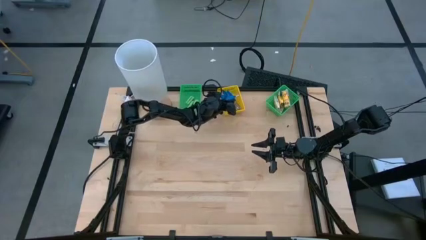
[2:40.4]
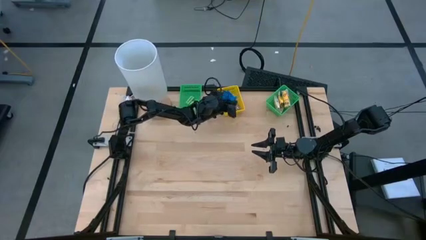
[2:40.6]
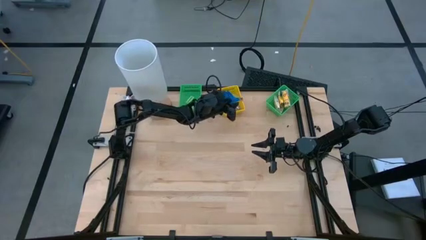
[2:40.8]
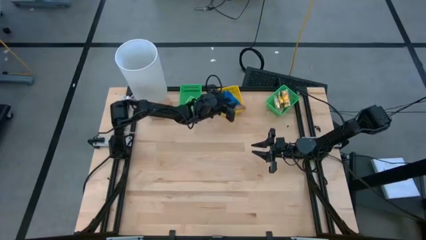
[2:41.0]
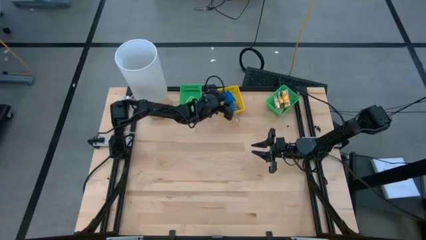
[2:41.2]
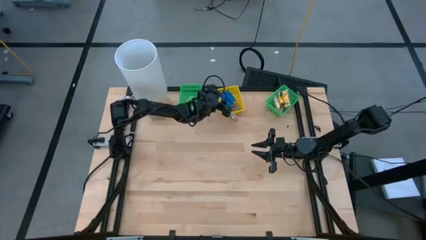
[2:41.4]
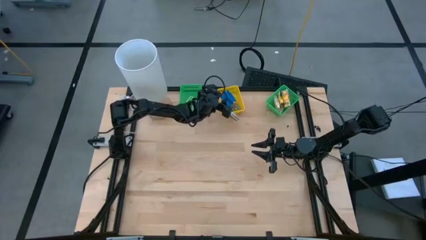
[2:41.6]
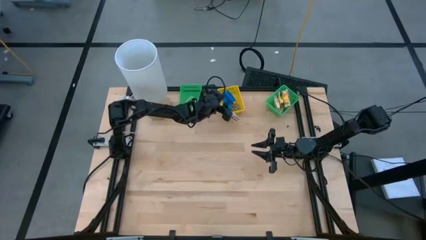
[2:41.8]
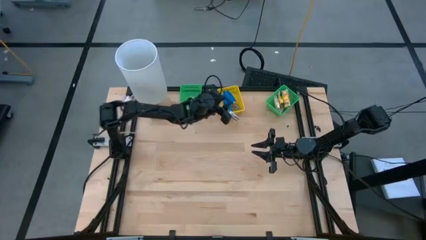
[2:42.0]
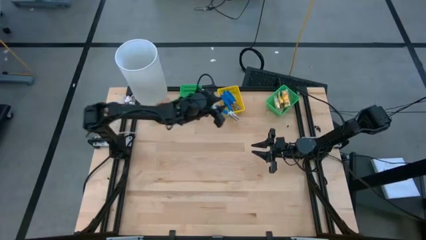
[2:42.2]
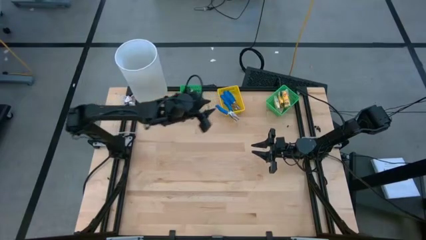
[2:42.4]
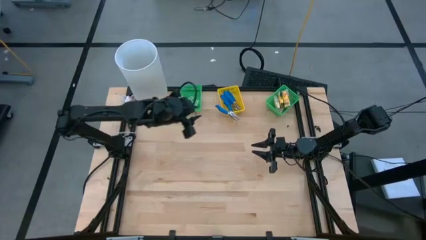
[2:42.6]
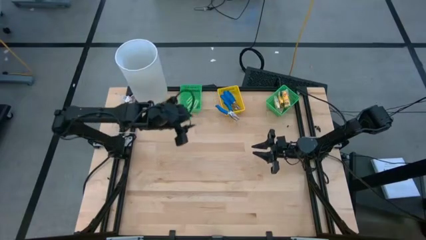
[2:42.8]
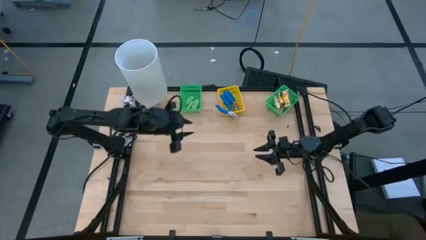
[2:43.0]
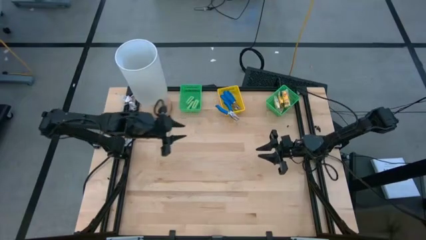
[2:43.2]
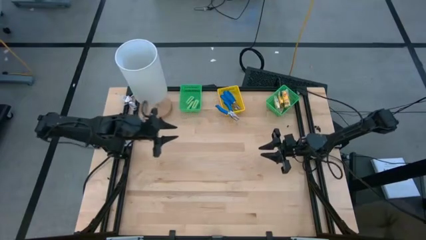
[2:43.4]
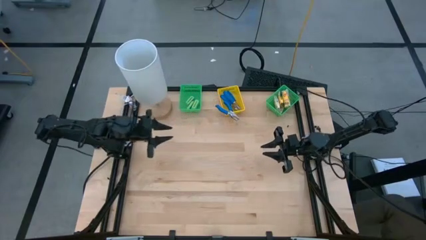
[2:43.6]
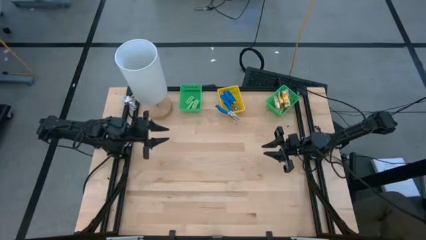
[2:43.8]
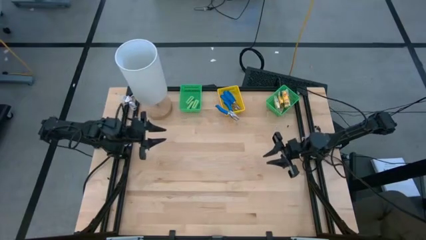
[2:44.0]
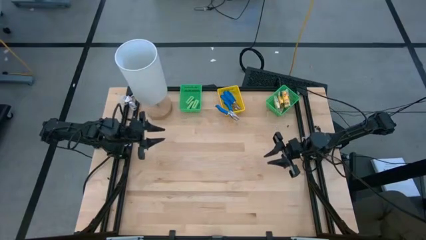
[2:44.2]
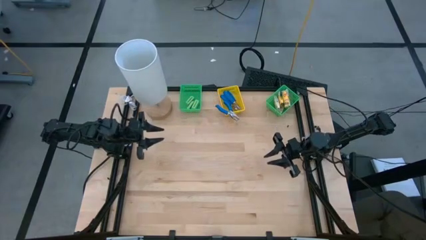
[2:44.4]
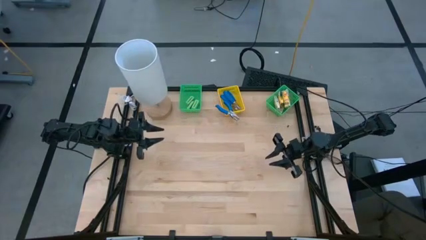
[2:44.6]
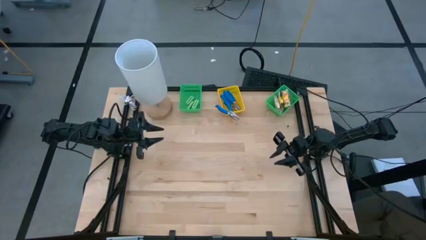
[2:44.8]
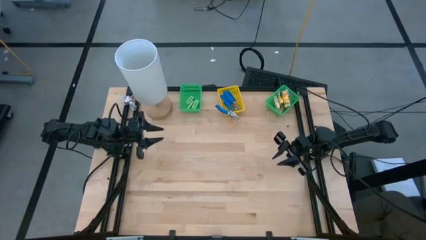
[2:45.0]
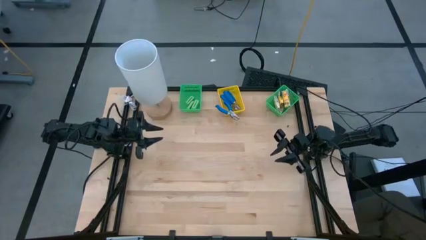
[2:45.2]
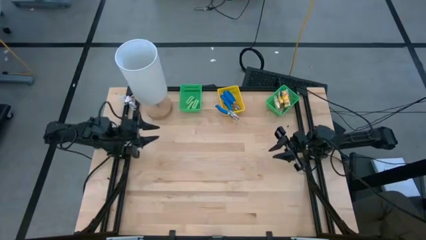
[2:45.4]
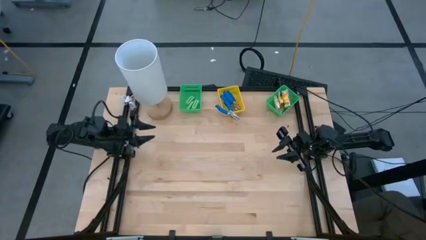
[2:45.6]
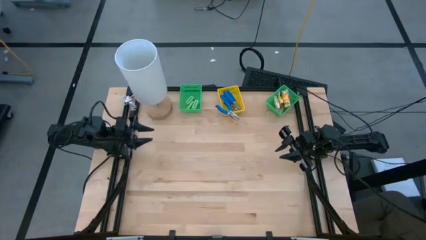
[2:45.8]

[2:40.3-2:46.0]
Task: Pick & Place School Supplies
Return to home position

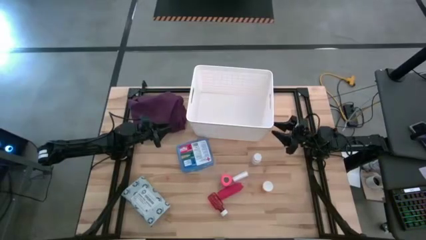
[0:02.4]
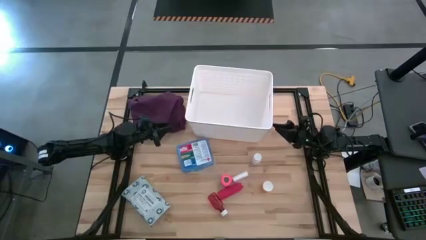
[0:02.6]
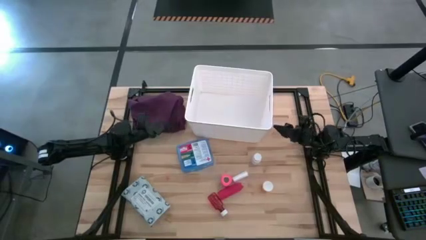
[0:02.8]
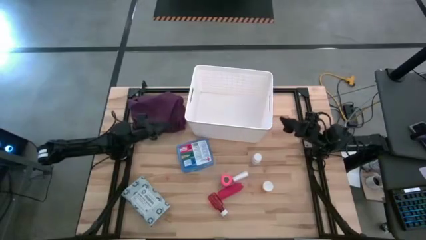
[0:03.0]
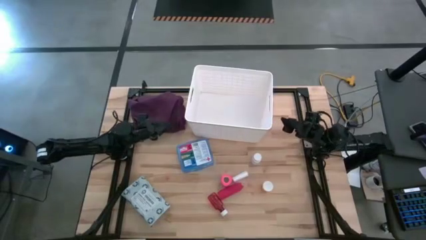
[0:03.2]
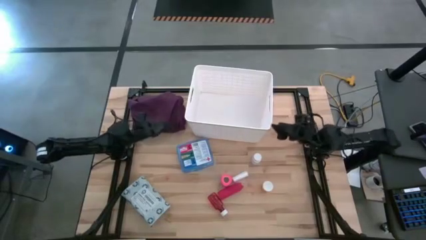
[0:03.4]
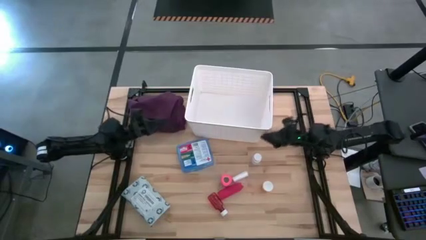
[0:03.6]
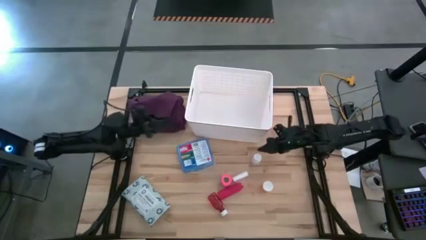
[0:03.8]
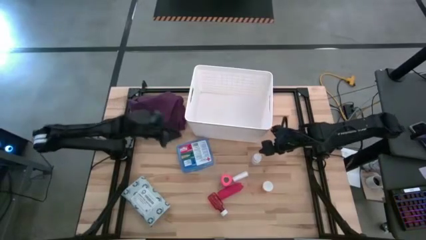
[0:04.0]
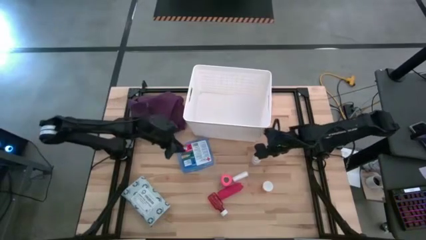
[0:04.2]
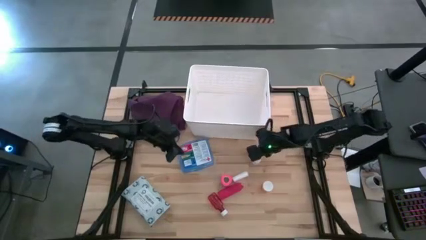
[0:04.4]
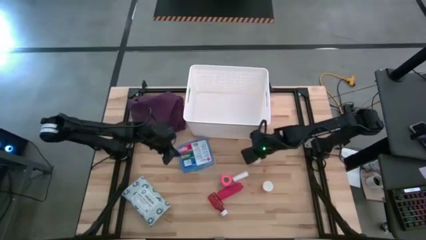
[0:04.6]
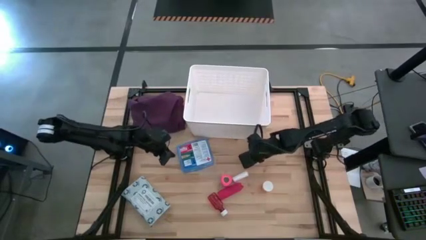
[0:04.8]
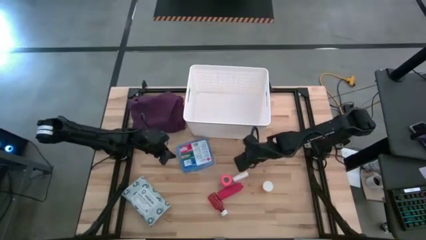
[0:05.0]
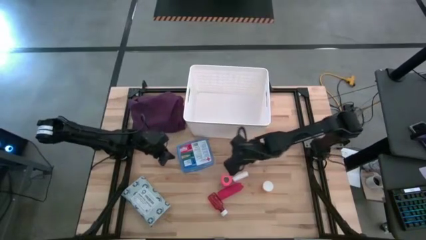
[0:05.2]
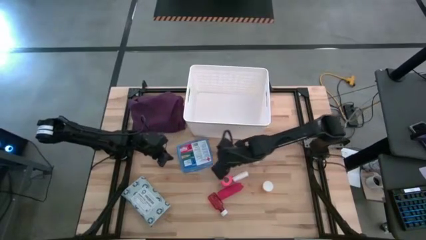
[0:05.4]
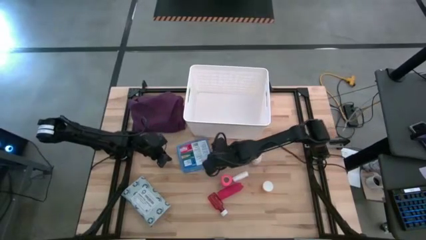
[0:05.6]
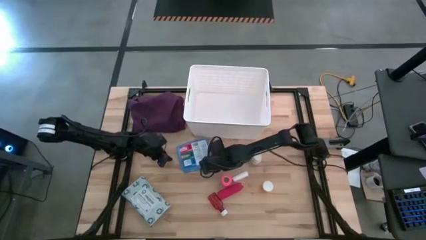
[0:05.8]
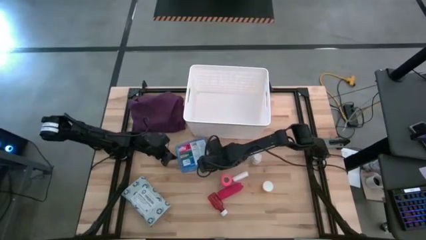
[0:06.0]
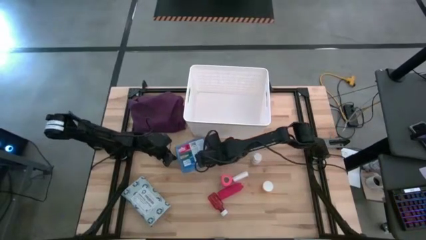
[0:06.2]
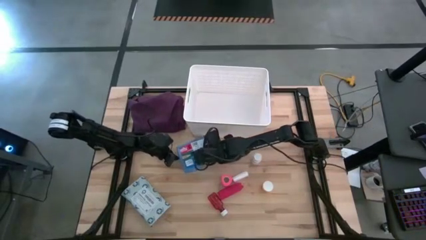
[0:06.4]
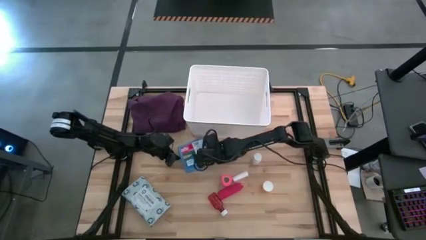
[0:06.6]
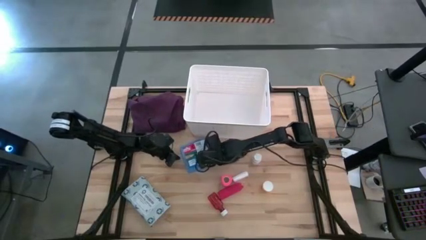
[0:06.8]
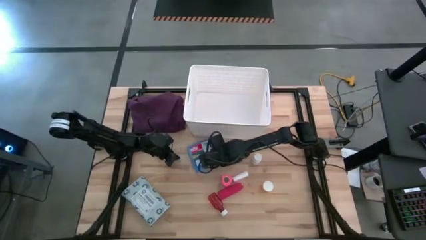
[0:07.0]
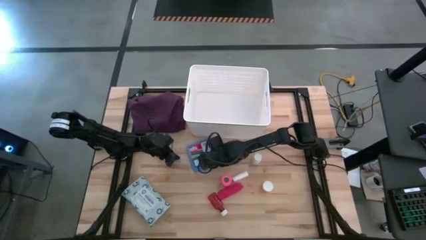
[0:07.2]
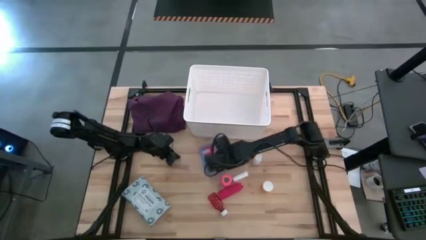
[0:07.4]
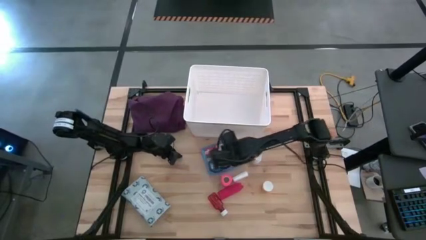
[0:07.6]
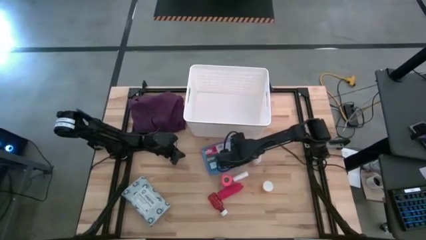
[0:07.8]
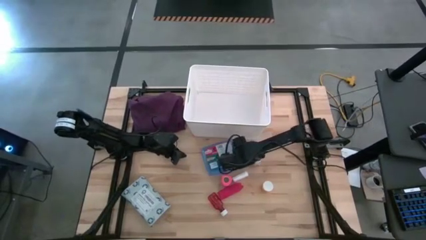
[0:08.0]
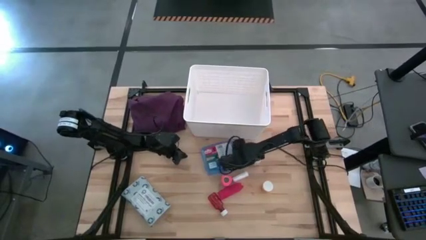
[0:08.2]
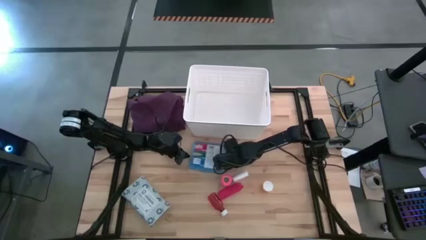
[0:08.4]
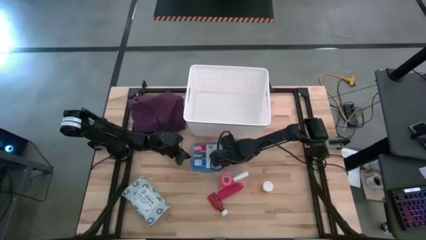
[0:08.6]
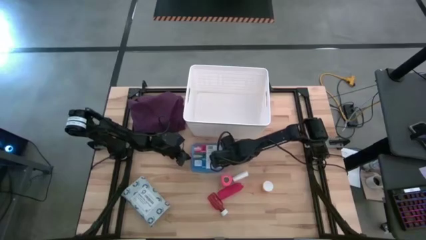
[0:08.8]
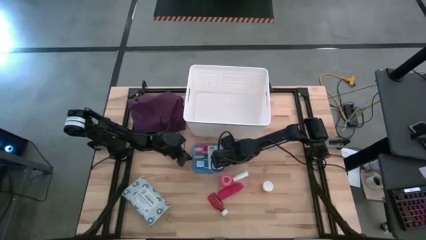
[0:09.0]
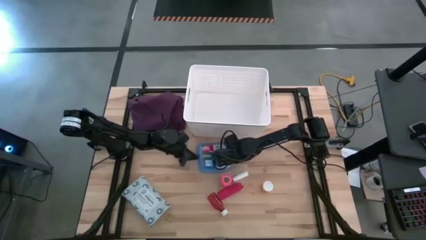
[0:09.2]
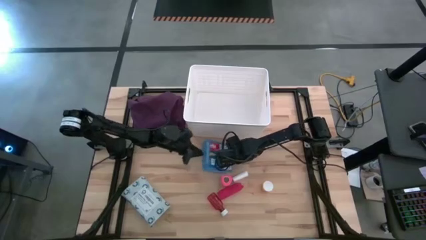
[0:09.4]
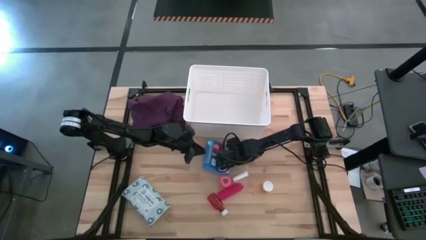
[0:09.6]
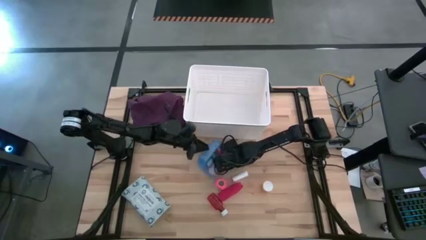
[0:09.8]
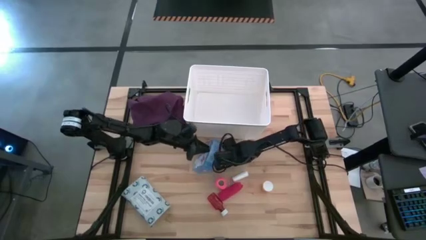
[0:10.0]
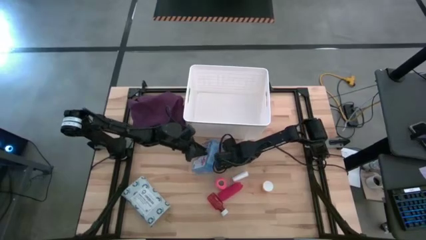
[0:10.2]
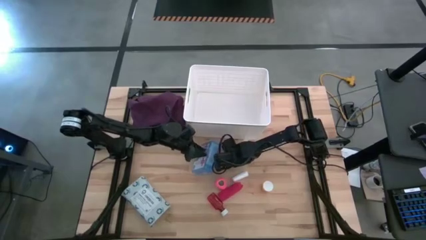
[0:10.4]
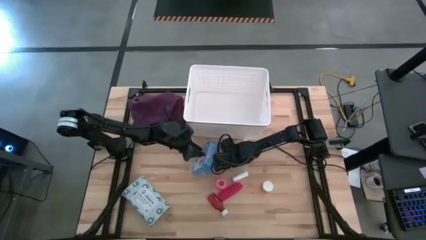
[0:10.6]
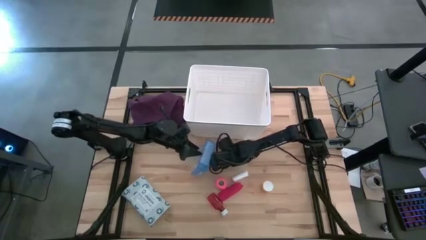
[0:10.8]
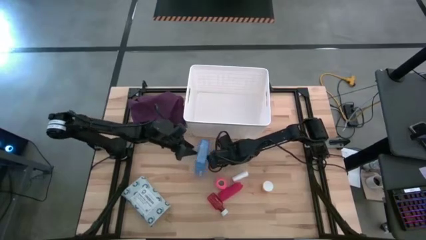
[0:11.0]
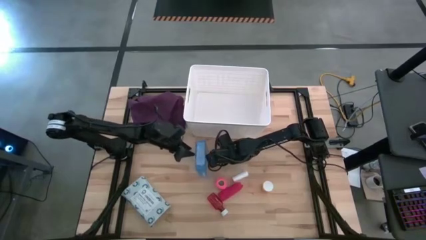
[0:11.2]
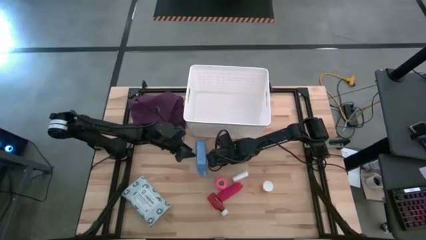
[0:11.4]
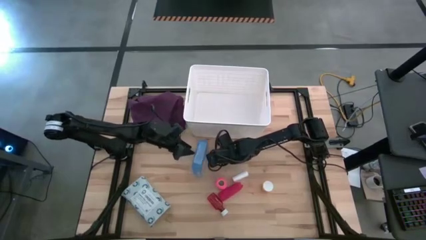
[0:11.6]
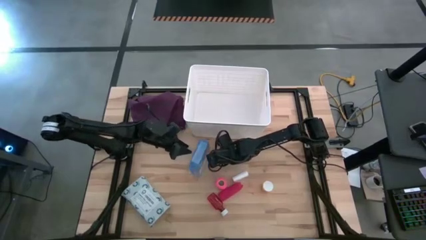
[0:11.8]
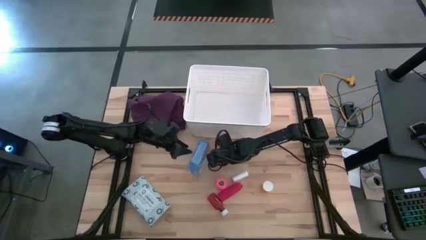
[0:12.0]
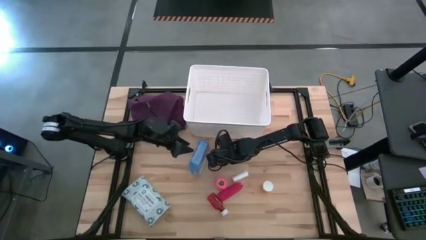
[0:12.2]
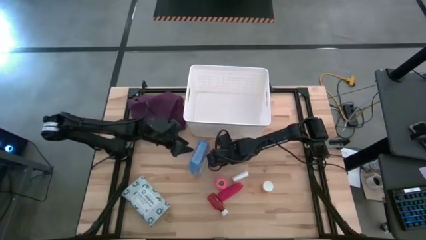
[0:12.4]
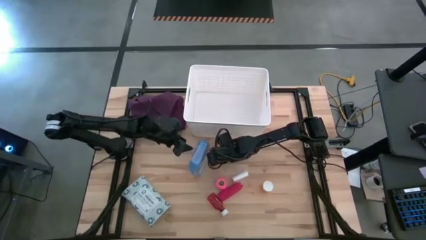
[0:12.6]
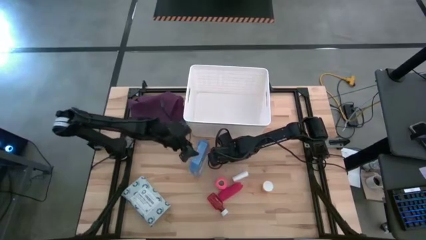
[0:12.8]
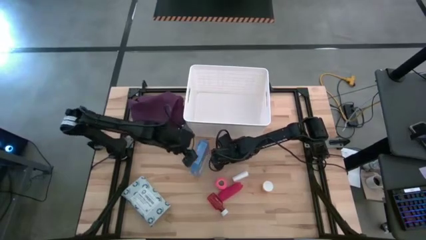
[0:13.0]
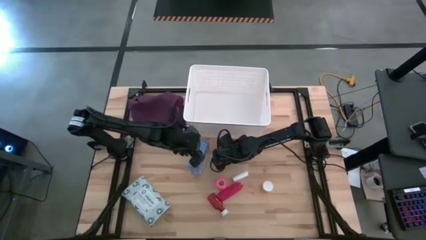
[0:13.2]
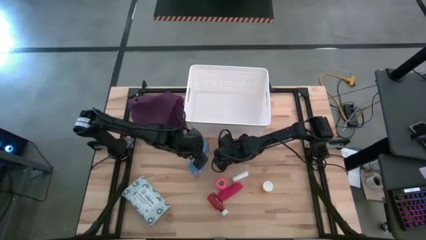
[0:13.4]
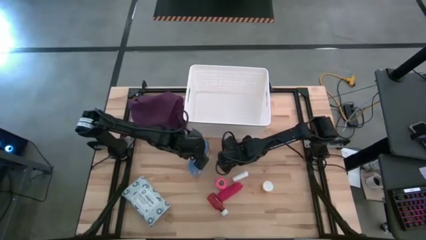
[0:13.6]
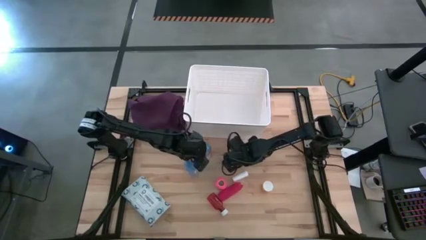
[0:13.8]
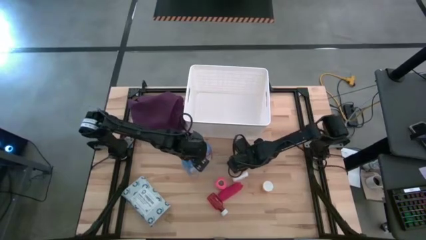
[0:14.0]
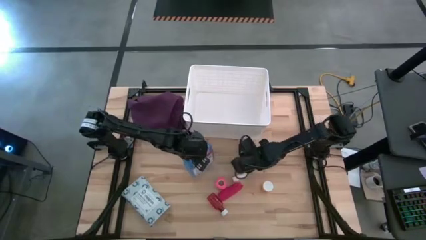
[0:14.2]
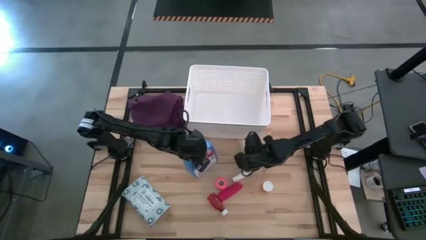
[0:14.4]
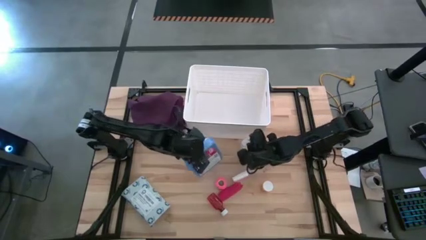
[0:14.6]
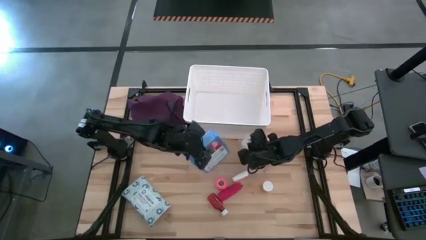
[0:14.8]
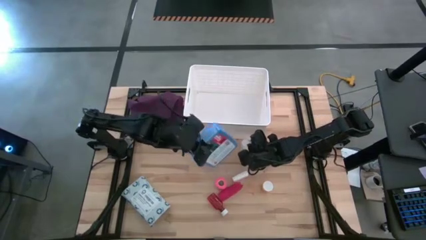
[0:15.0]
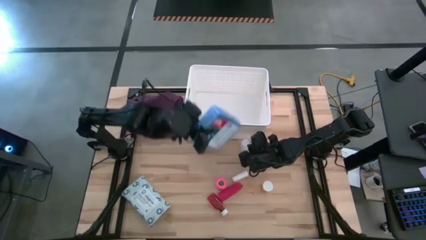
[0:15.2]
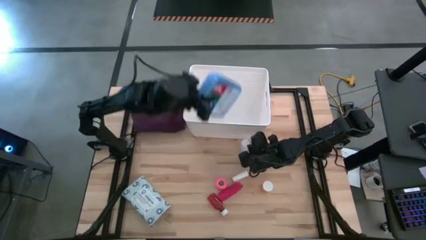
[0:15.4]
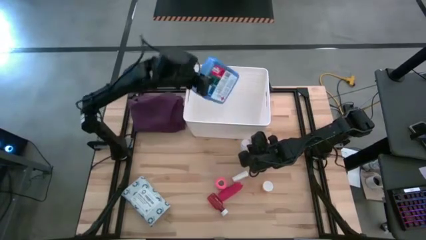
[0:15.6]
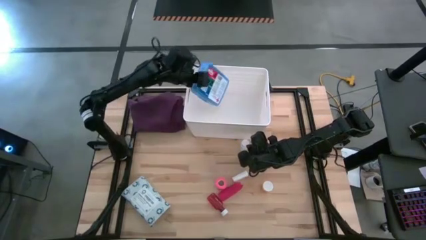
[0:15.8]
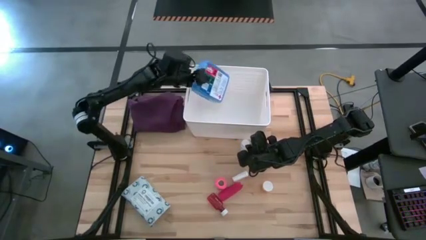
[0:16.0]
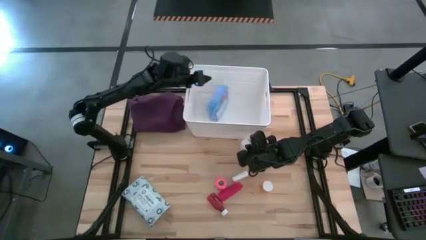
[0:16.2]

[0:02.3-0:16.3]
Task: Pick & place medical supplies in basket/bin
Put the blue first aid kit into the white bin
